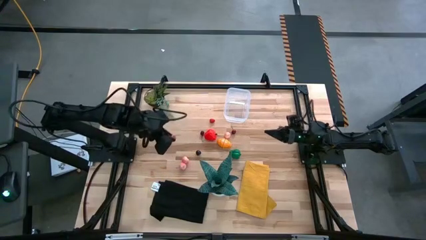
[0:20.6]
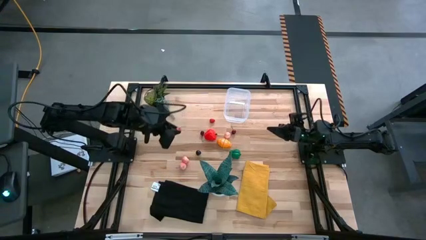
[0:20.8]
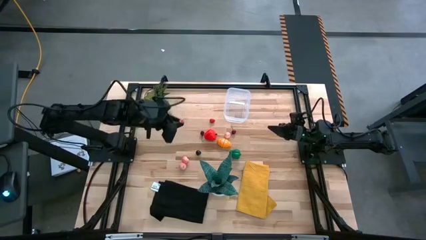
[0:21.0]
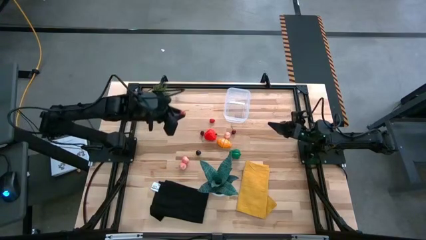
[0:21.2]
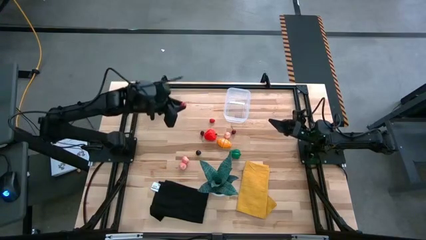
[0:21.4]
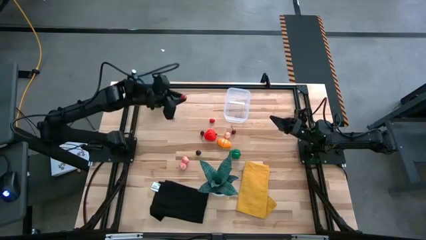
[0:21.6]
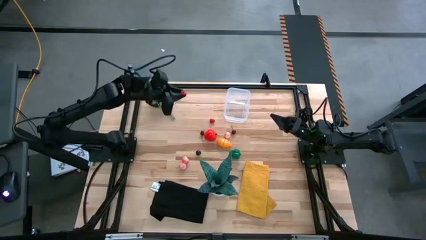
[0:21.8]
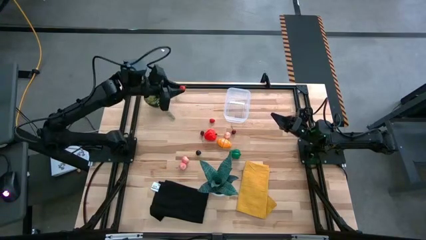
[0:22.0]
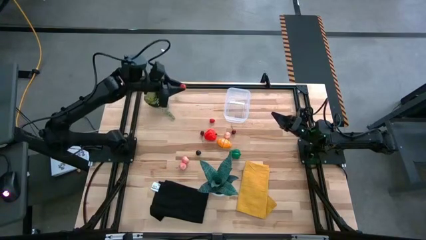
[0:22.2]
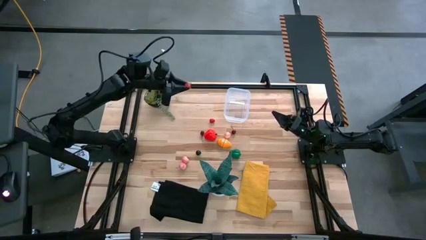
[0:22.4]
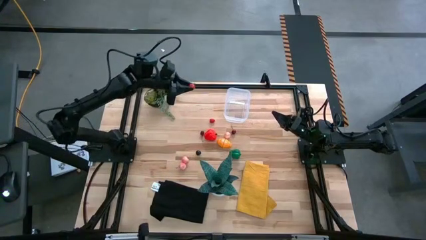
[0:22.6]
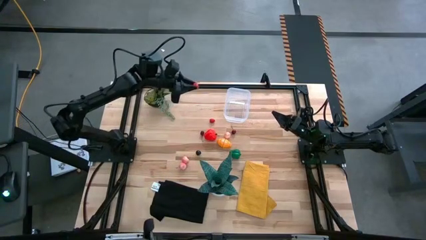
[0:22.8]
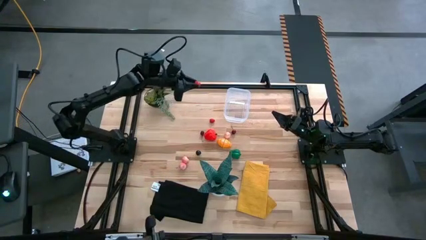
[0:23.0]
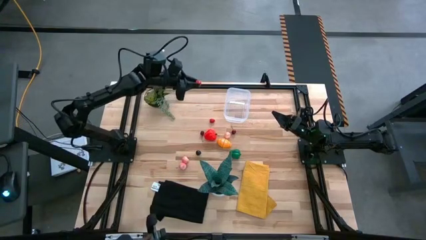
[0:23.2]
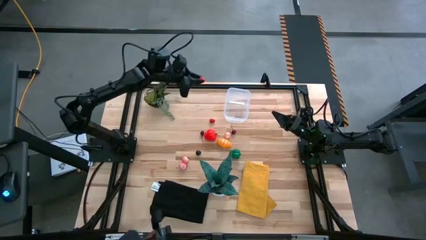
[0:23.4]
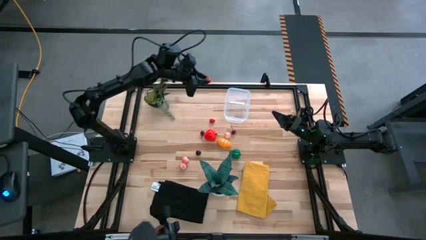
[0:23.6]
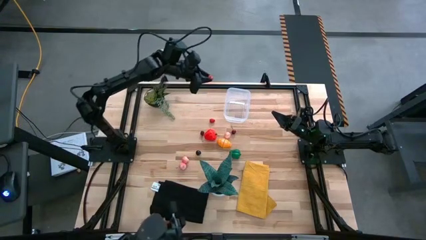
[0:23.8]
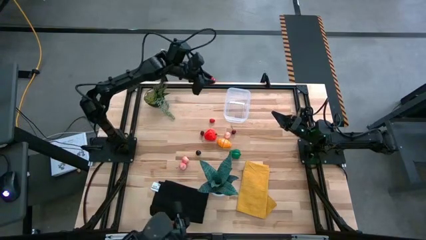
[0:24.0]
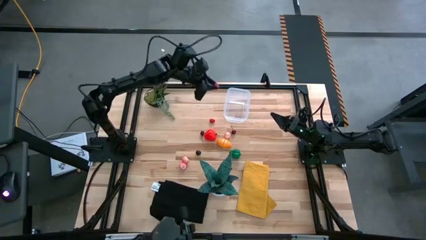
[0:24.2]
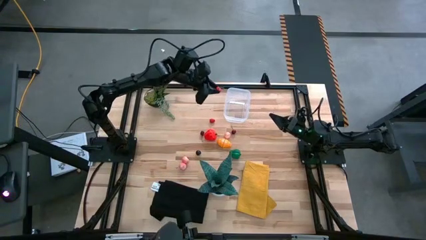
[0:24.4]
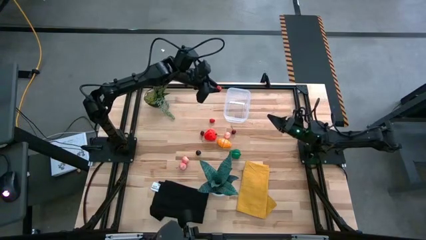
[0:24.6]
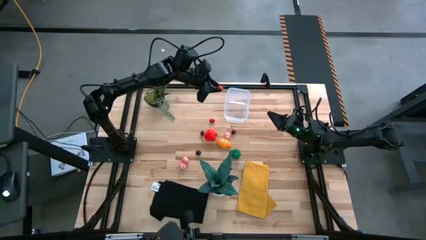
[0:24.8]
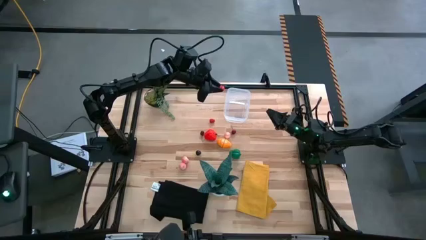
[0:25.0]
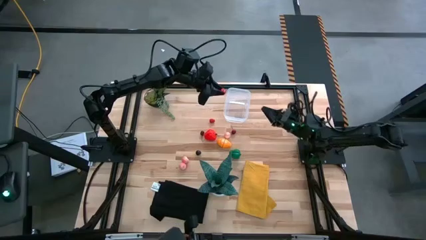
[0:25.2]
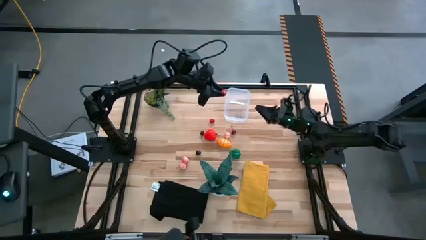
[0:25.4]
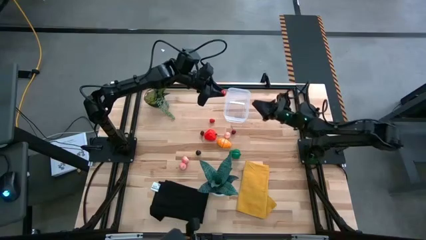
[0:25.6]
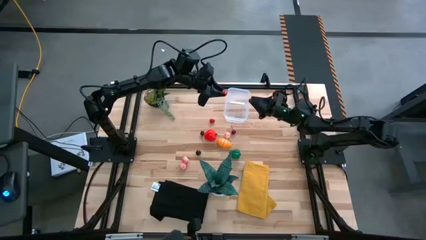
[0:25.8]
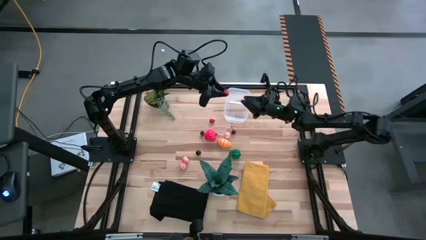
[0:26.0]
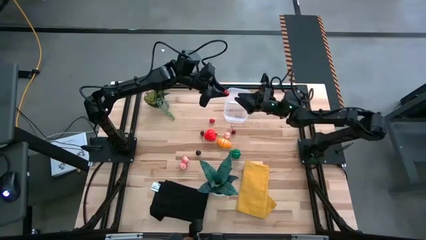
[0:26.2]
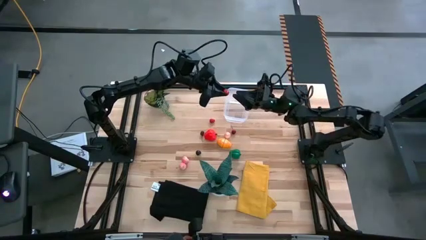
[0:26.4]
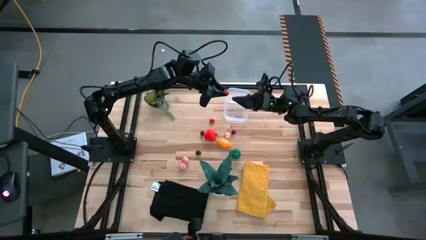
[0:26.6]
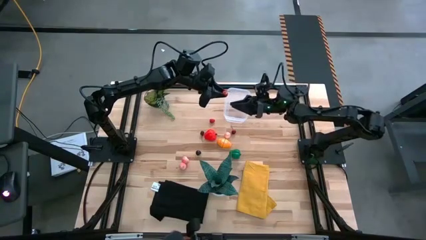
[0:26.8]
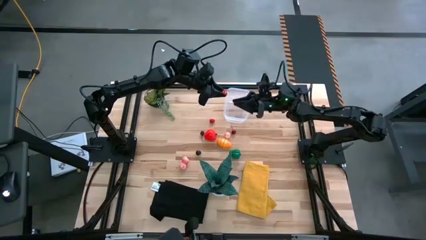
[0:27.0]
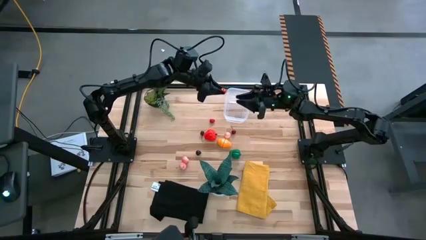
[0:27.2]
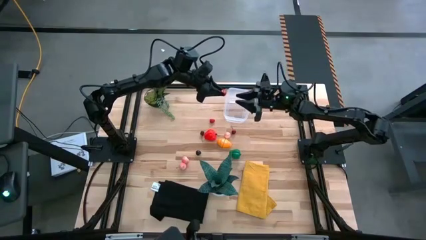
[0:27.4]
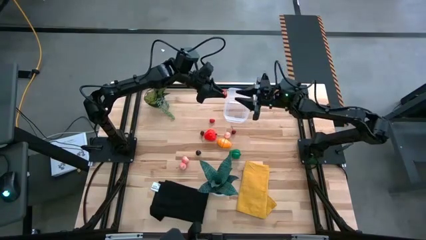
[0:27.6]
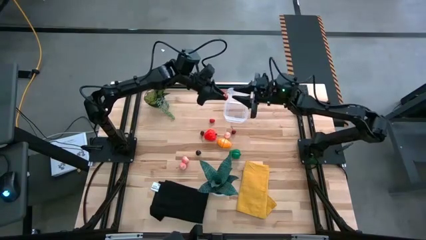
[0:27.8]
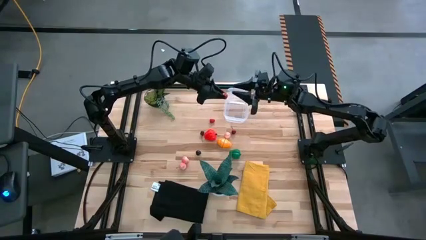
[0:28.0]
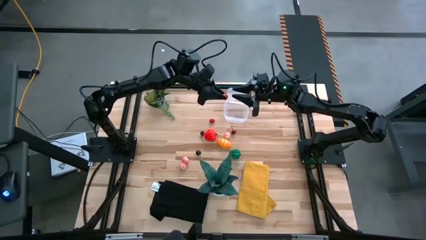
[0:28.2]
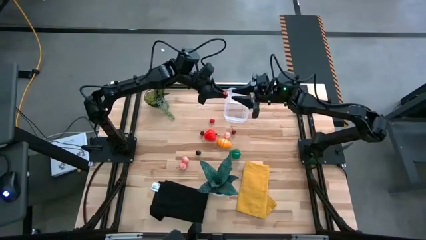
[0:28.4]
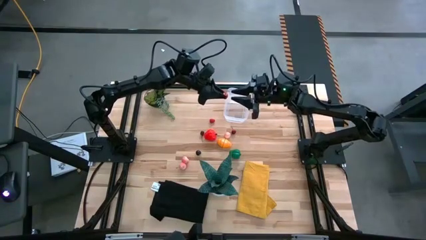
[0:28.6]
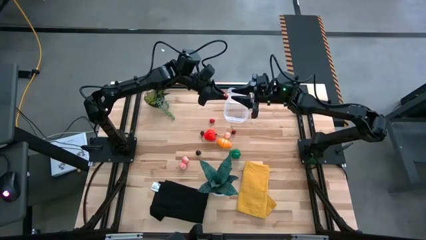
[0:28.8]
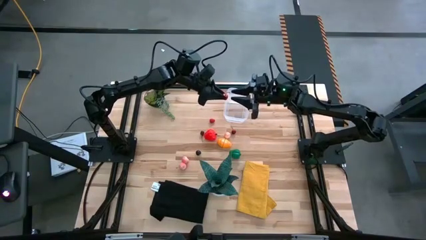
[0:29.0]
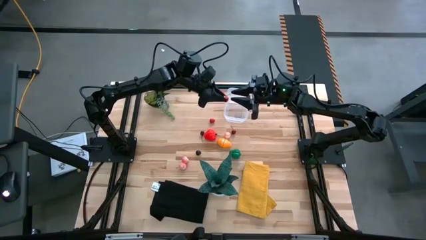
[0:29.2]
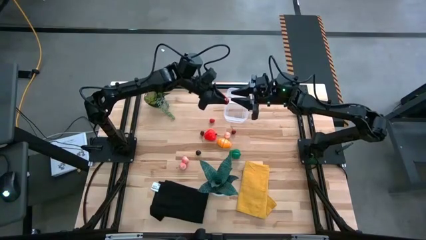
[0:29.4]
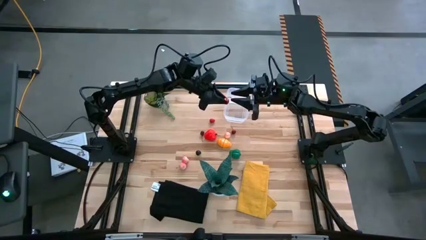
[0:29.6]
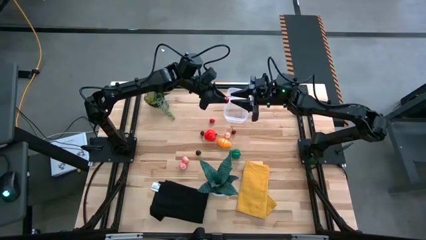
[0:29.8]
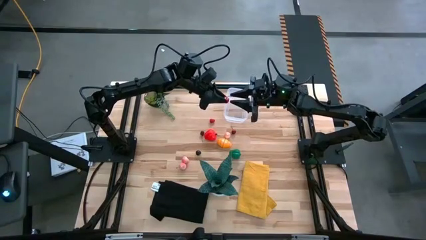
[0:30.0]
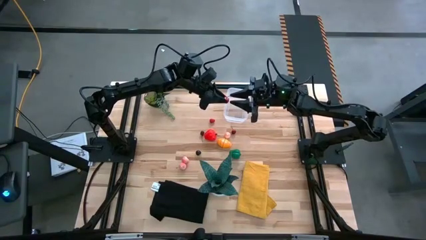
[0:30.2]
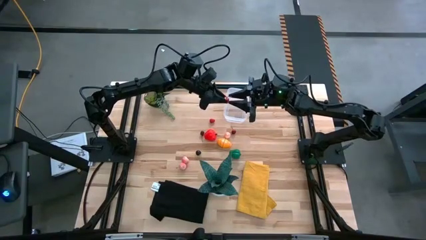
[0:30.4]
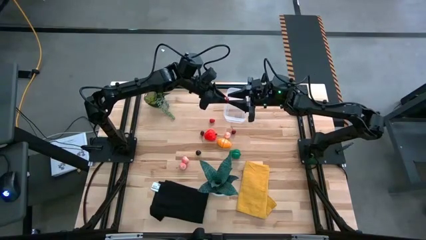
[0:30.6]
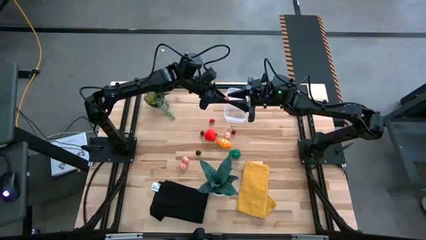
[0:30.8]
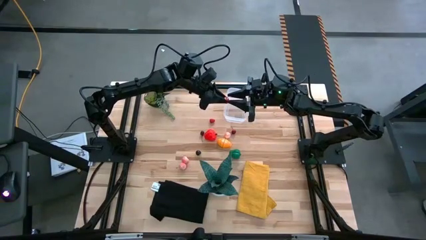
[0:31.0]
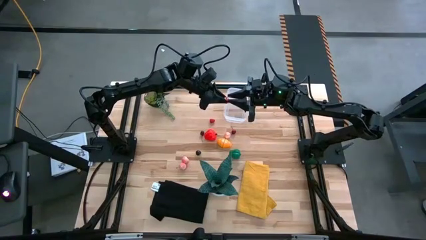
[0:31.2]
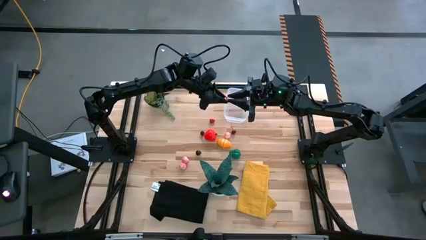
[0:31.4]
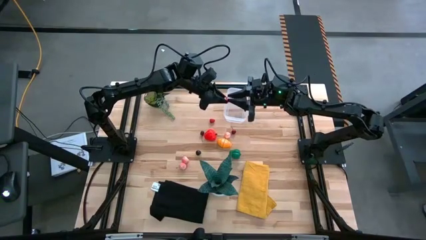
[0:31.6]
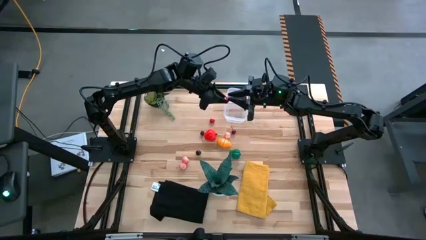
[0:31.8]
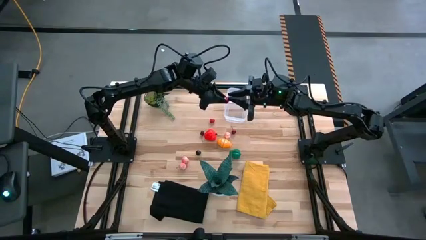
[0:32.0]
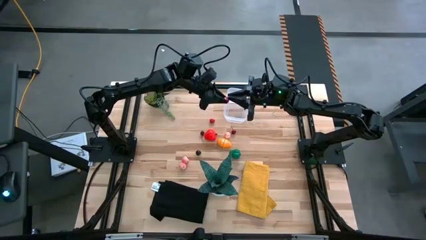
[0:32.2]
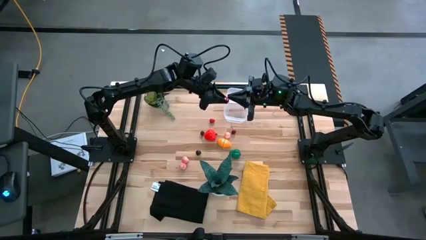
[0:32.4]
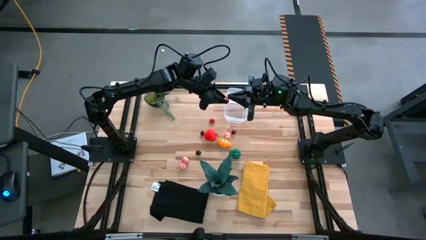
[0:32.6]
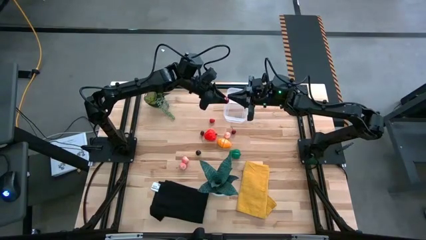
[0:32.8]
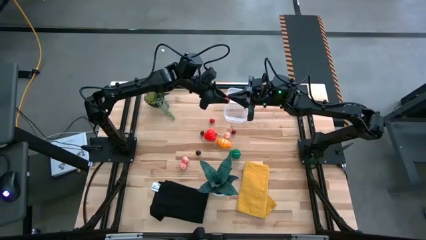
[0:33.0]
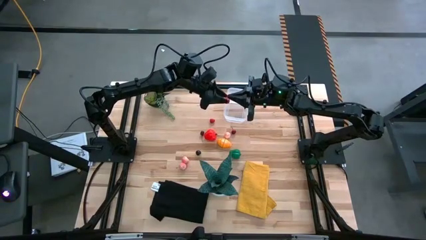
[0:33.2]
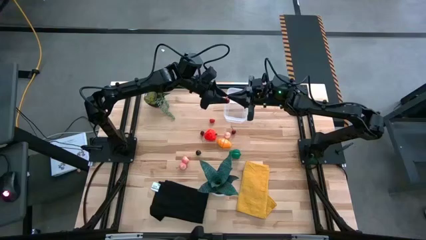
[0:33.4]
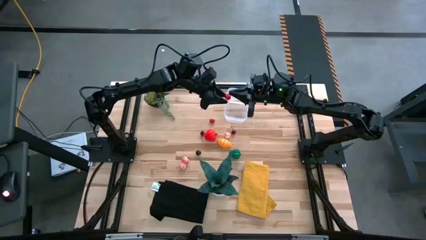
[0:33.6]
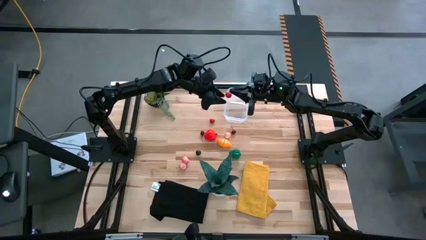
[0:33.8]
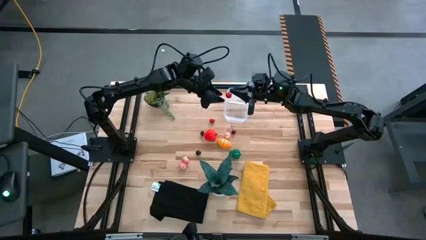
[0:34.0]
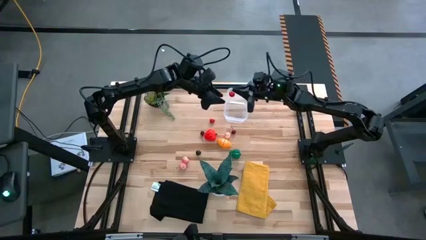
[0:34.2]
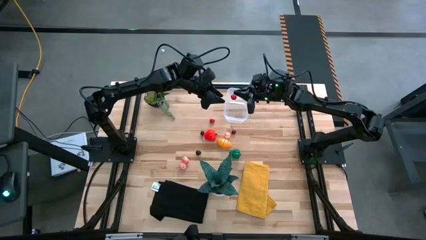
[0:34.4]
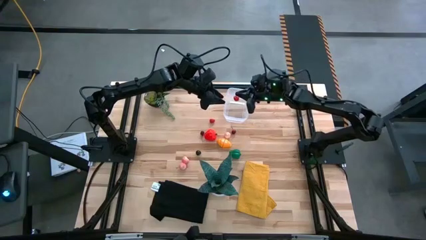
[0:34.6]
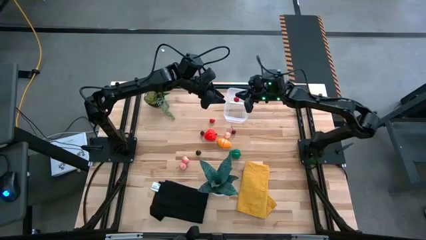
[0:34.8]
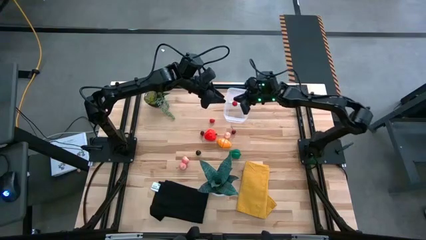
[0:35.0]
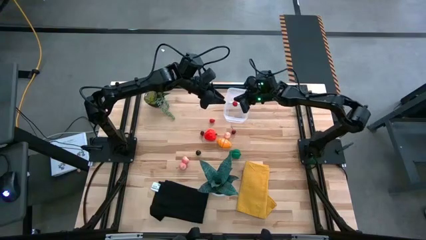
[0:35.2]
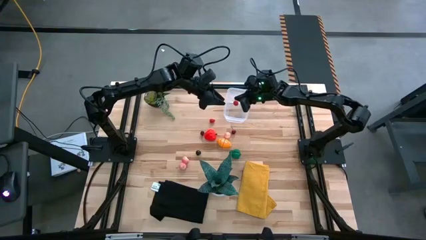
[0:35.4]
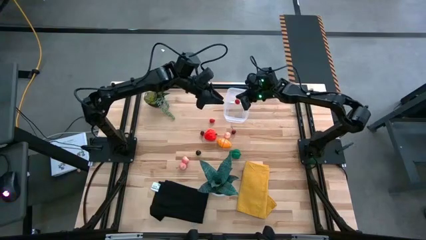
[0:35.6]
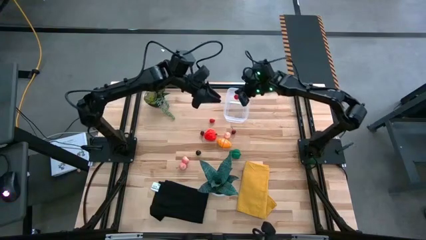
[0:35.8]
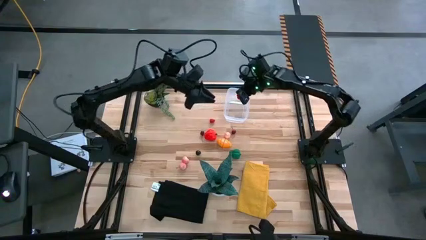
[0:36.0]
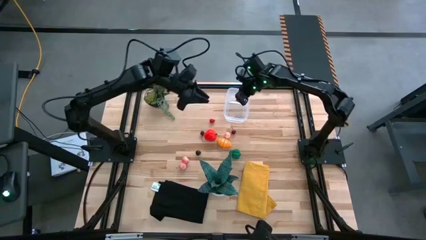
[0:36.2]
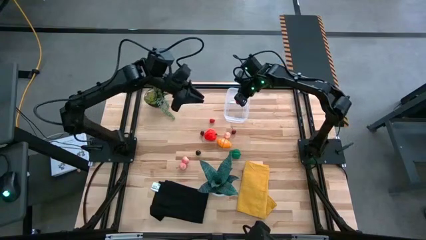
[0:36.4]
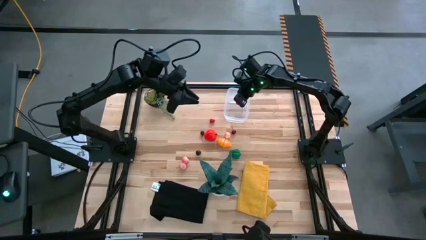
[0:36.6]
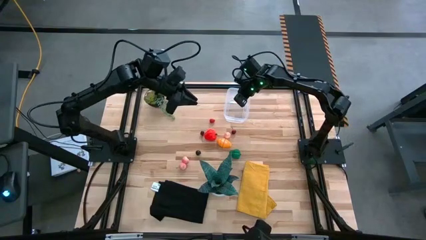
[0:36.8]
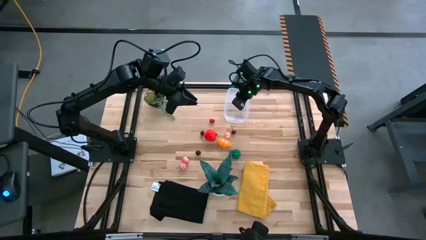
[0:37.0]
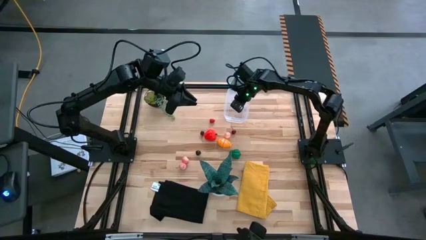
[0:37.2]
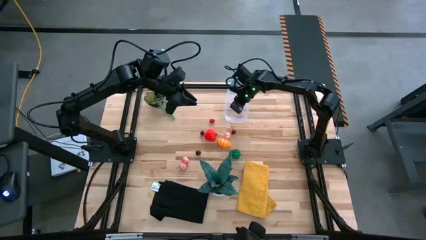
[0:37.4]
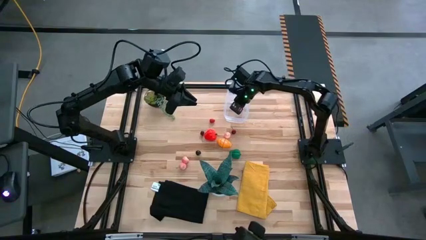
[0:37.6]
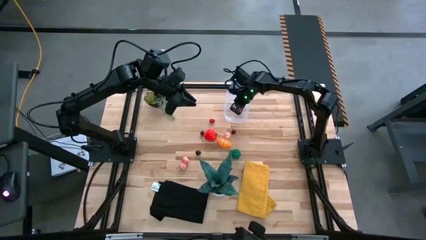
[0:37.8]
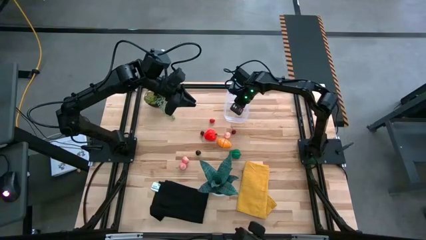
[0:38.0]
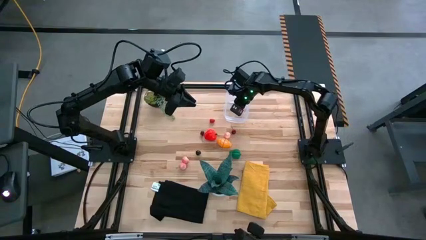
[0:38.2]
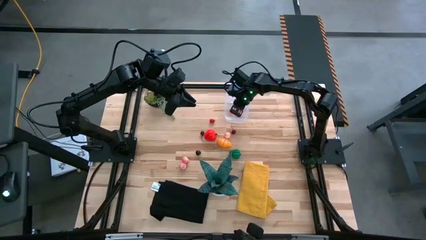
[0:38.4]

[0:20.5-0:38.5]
Task: Pick and placing Produce into tupperware
Put the bottom red cherry into the transparent container
